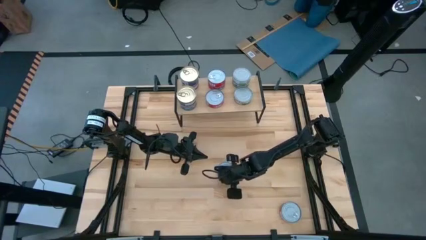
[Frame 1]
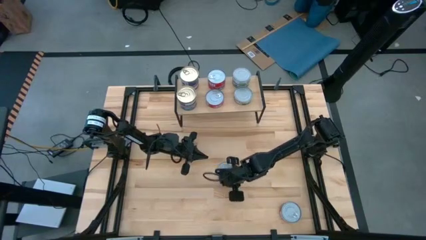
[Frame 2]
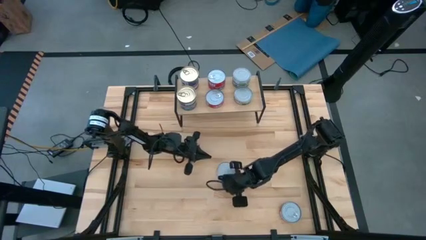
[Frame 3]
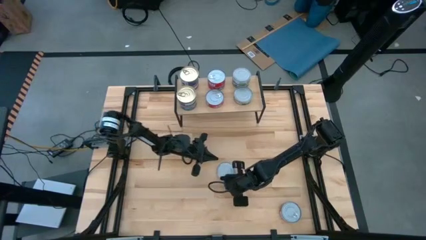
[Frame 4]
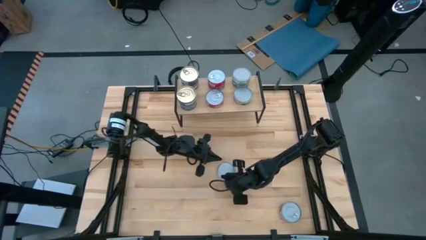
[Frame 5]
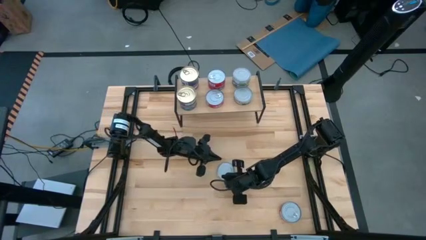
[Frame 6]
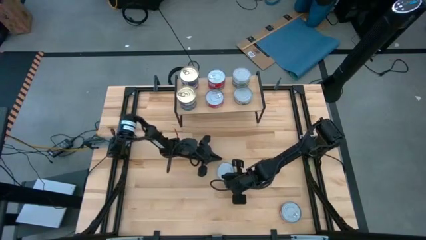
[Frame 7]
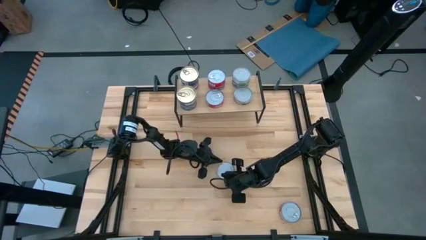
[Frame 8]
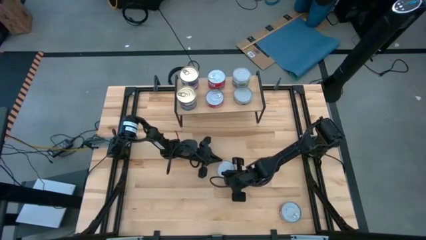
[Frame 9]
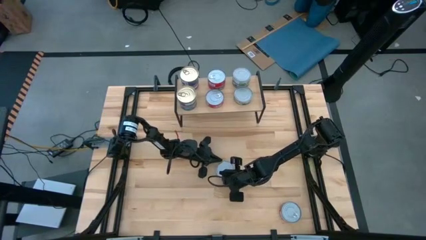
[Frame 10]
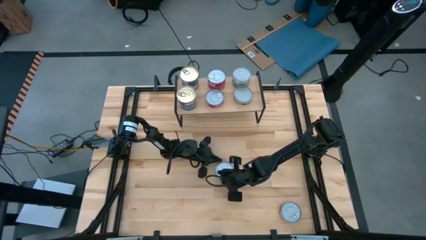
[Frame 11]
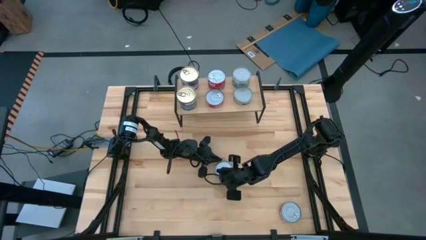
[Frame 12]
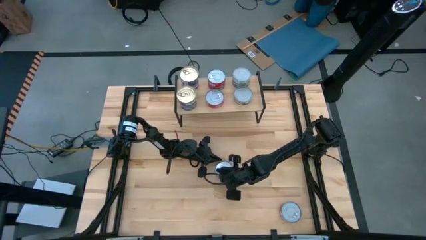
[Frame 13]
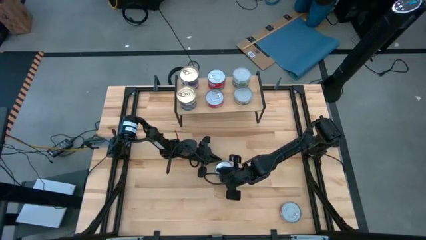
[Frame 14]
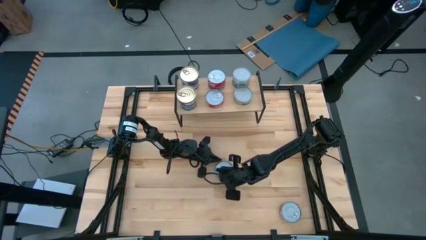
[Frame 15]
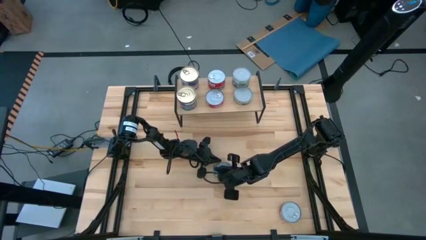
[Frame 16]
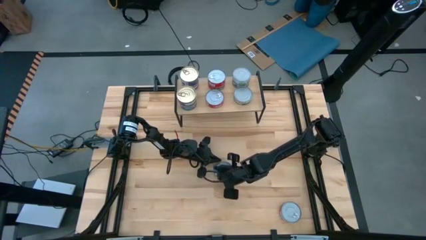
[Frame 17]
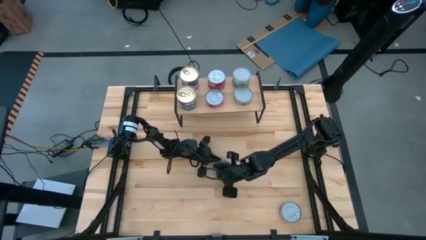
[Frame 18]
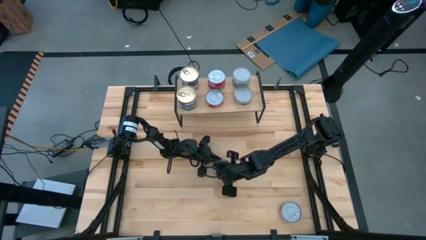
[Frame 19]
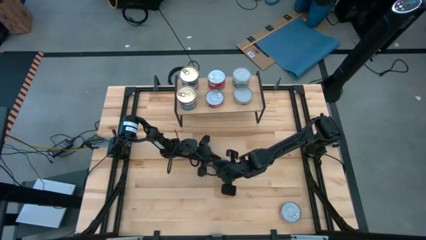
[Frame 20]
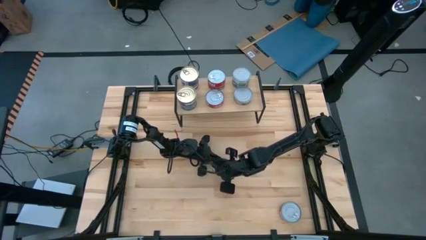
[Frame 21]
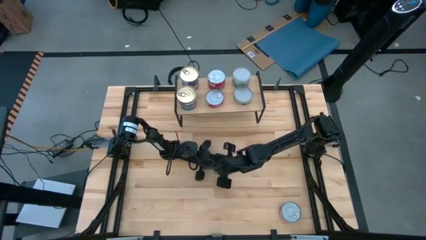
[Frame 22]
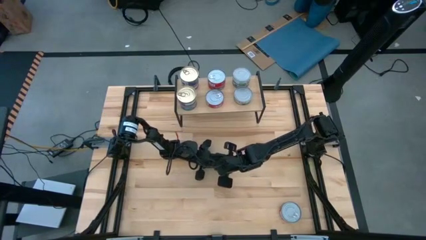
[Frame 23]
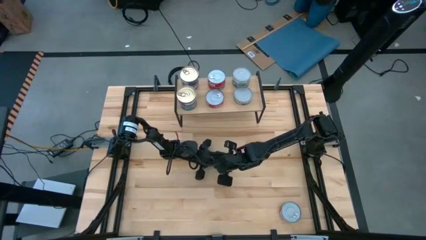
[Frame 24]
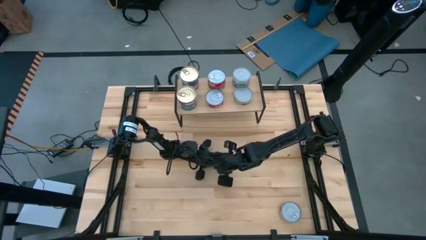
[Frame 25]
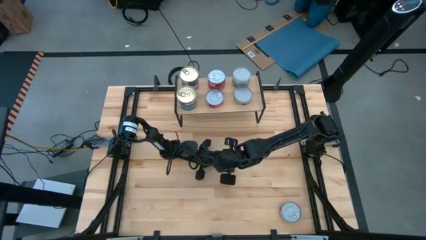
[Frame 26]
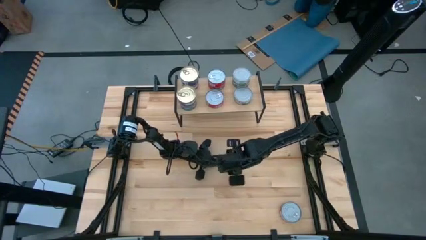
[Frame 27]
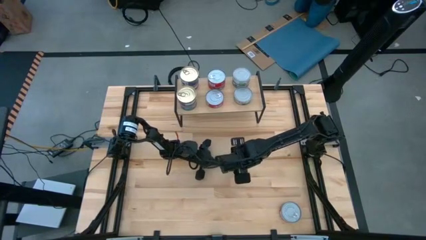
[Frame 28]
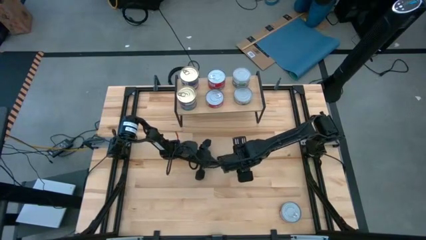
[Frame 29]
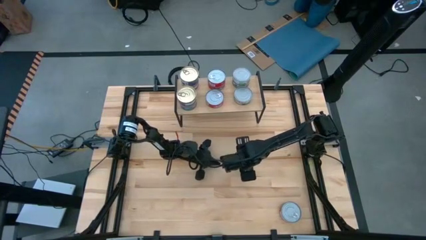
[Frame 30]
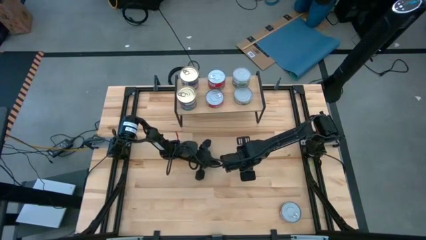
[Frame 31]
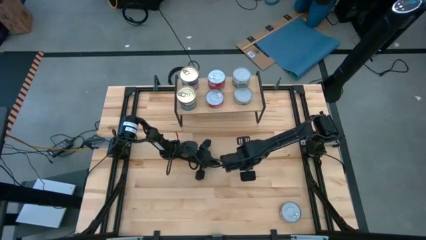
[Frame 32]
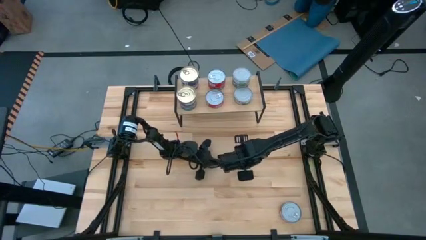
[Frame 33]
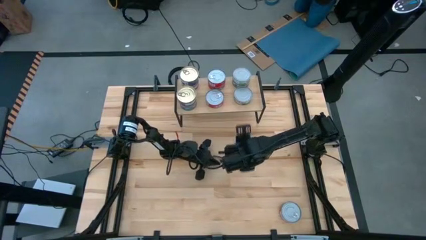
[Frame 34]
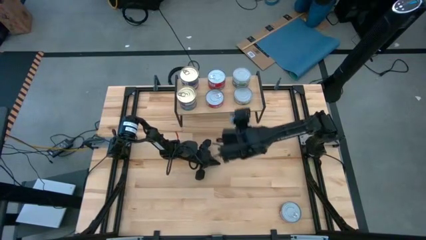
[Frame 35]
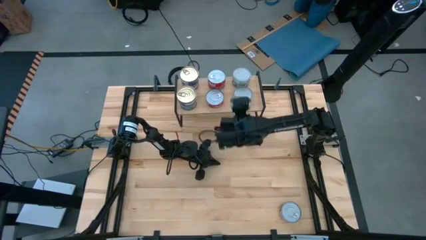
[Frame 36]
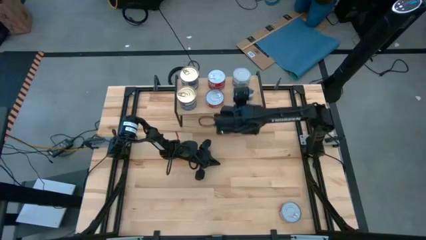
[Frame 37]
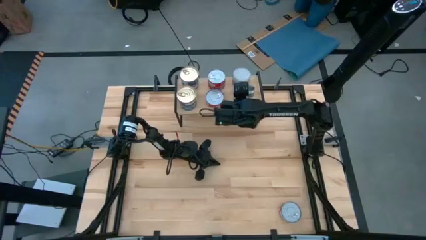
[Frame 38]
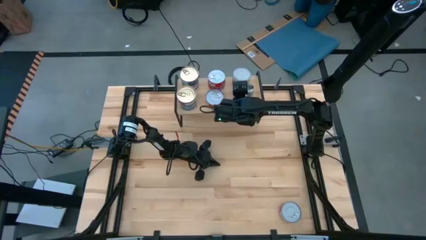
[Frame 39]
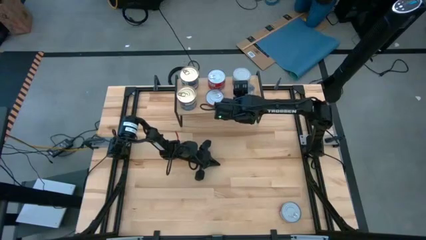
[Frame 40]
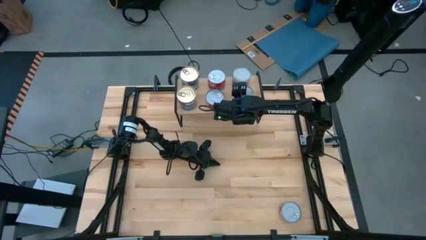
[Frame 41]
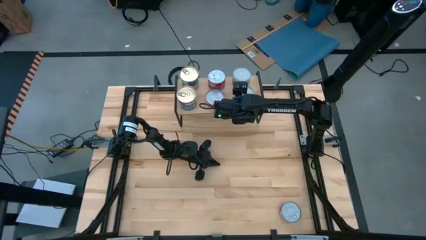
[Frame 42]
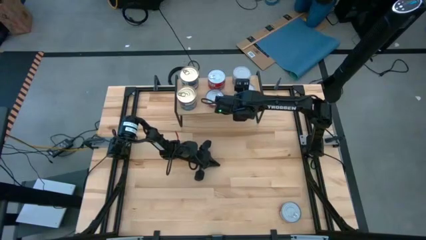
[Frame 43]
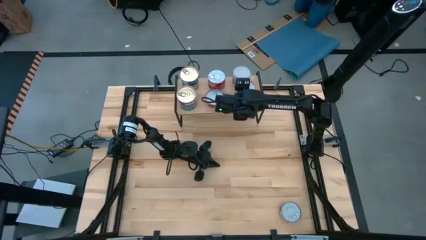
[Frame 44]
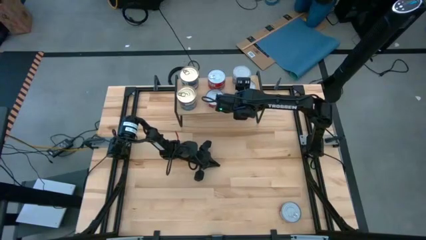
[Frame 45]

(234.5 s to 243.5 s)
Task: Stack canned seafood by type on shelf
Stack the green tuna can on top of the other green tuna can on the shelf

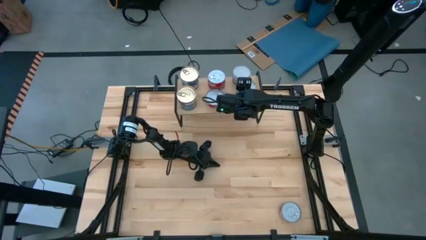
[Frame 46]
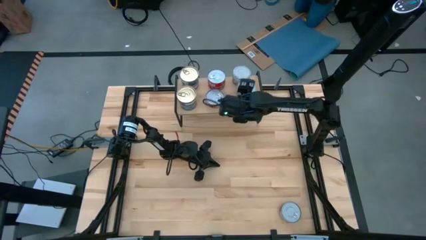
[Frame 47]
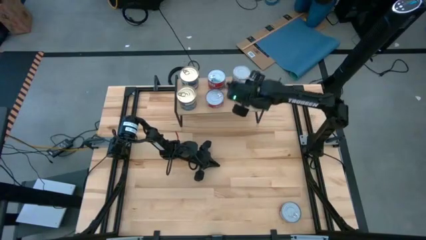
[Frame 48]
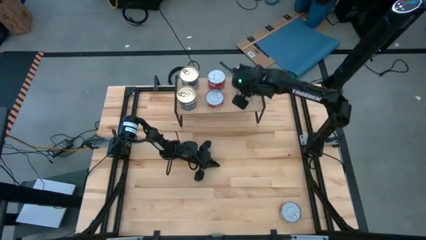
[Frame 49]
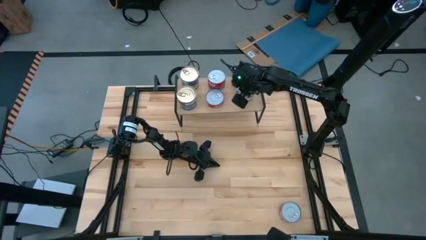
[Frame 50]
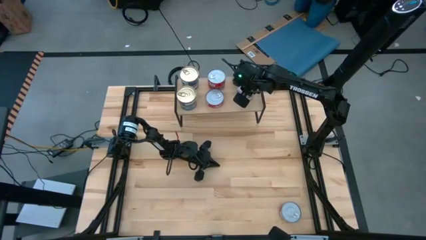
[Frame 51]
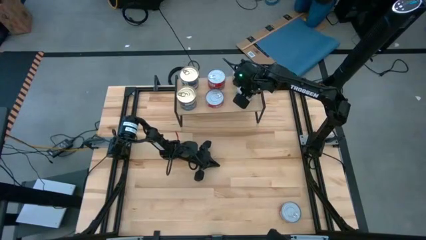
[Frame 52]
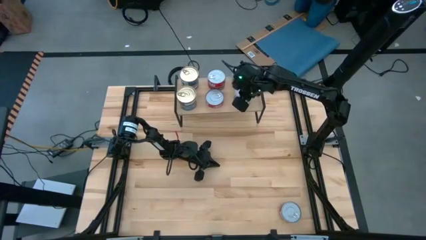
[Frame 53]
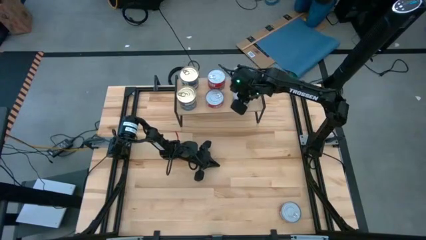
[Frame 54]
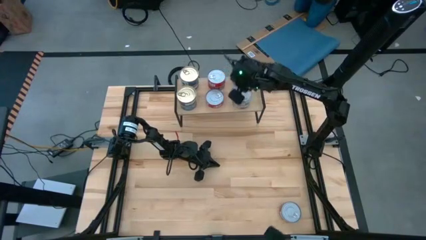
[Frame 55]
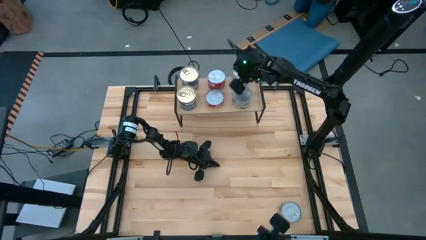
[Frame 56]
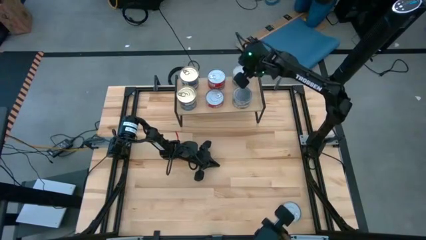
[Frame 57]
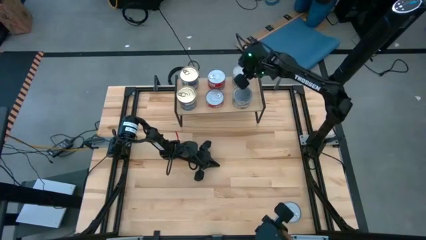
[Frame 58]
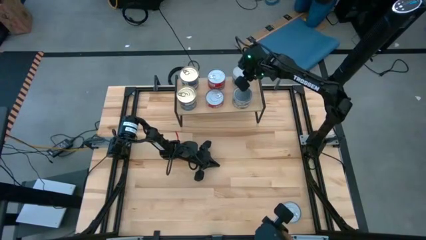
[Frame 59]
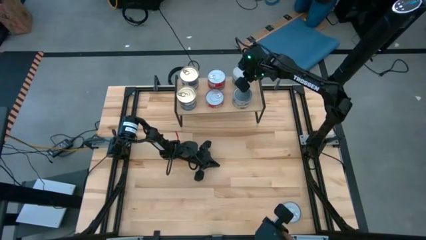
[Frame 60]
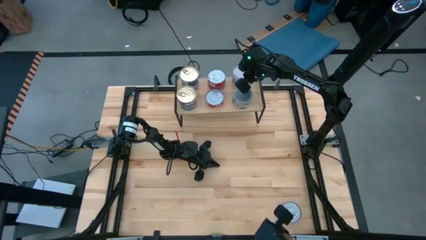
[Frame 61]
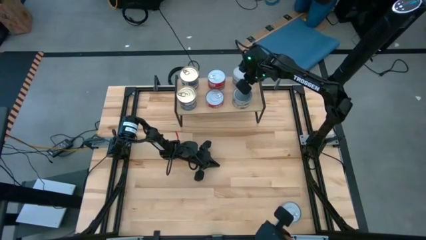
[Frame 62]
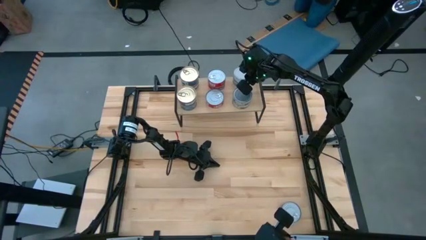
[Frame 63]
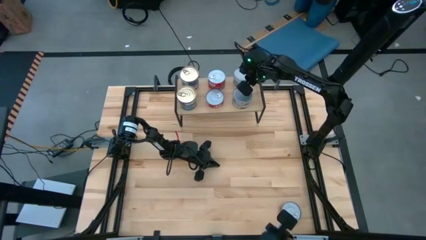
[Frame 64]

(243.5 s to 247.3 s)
Adjust the green tuna cans on the shelf

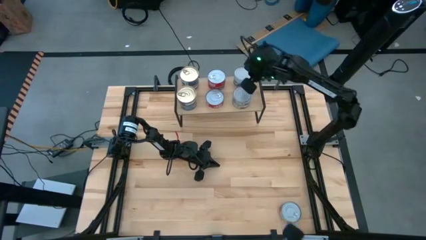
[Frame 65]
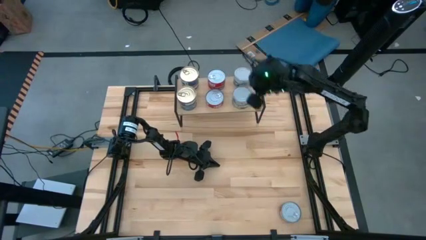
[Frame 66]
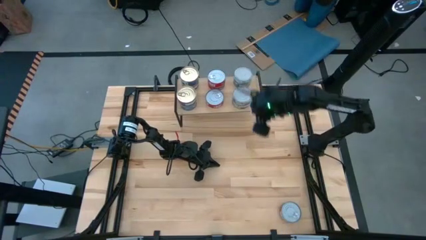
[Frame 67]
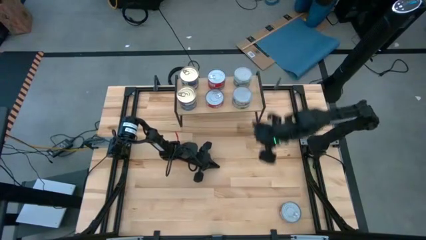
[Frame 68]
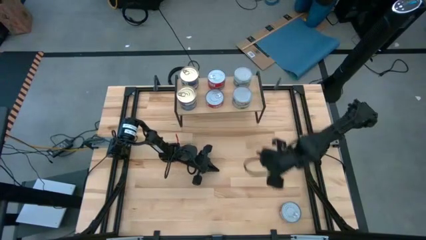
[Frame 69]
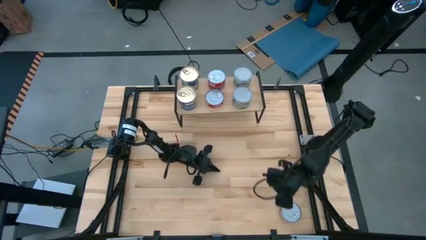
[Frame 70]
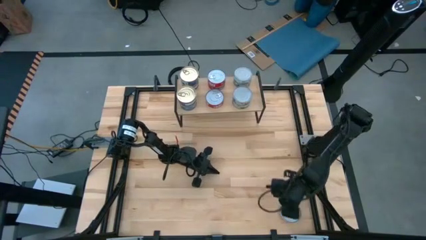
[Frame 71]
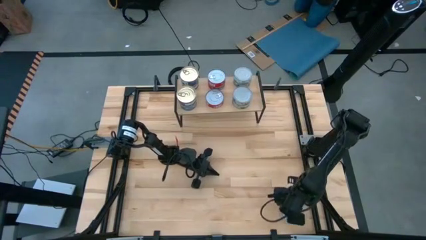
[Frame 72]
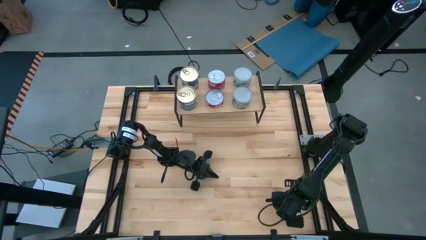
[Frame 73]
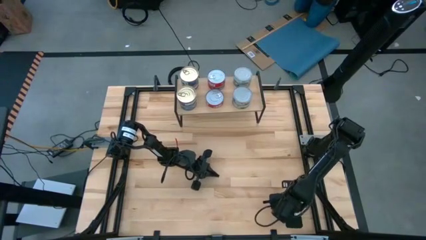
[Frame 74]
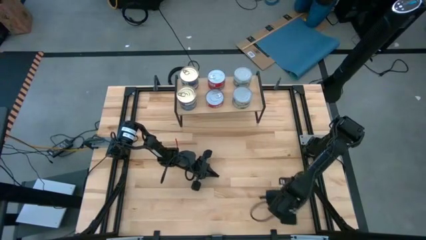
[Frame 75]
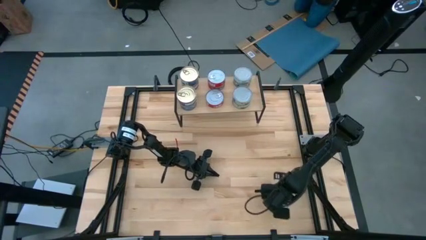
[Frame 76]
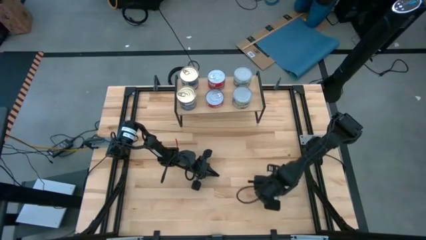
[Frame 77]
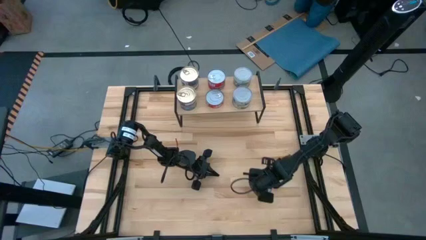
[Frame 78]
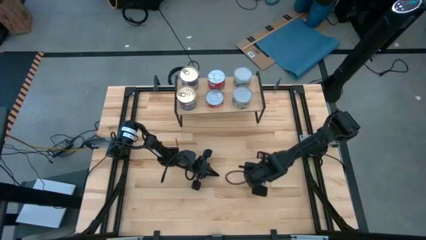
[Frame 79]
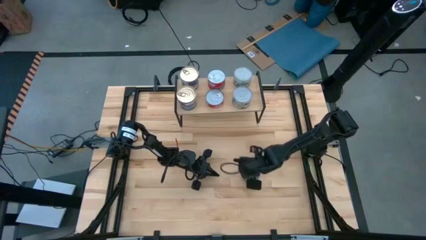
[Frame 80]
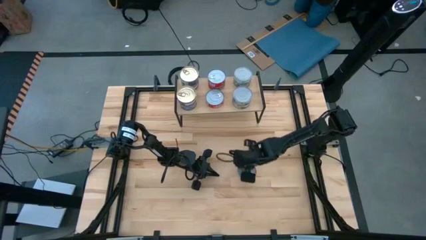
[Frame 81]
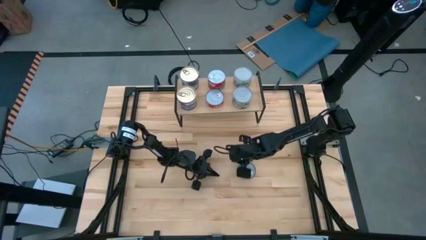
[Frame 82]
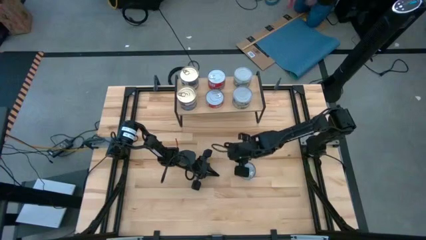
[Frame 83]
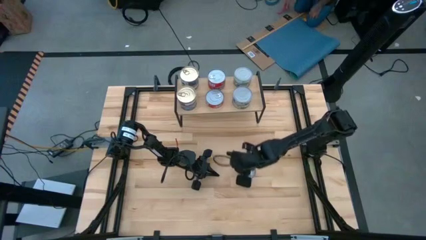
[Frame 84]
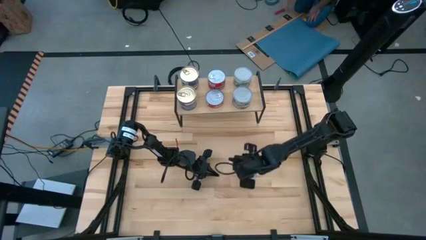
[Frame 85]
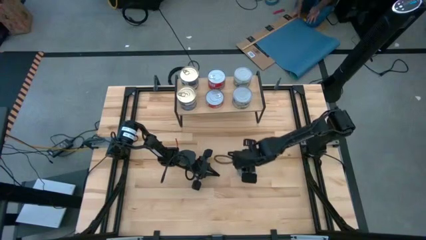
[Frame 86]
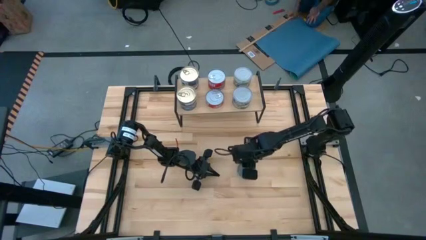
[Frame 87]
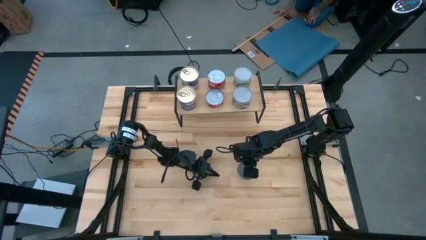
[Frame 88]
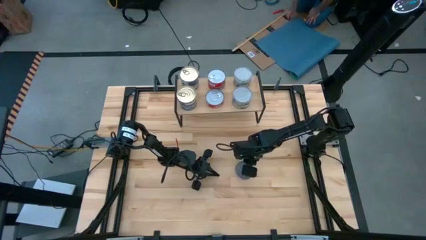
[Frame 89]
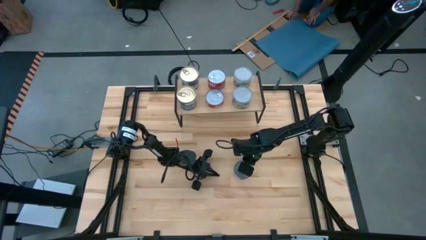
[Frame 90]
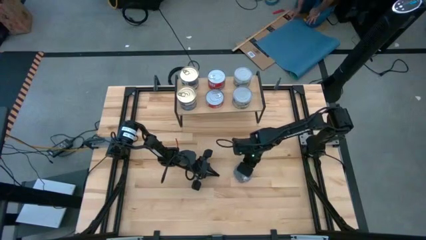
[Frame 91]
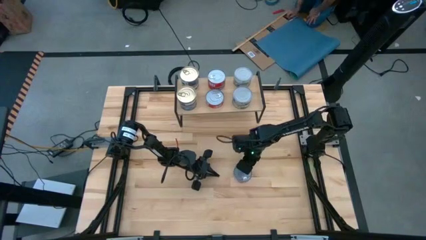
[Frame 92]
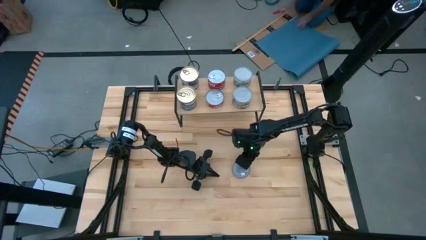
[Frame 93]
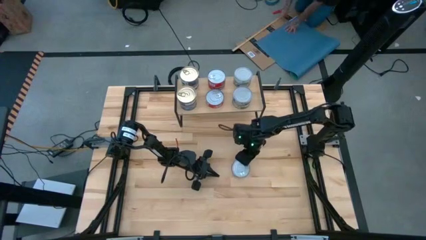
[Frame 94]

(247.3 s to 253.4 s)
Stack the red tuna on top of the other red tuna can on the shelf
